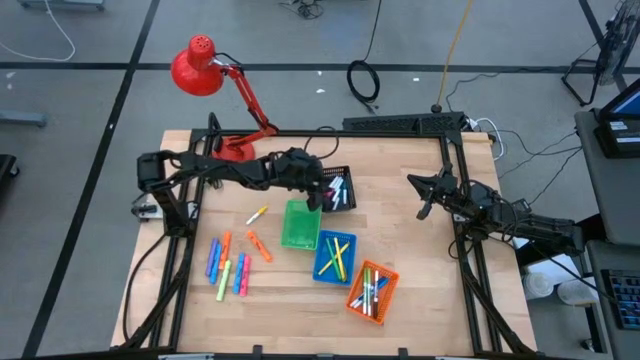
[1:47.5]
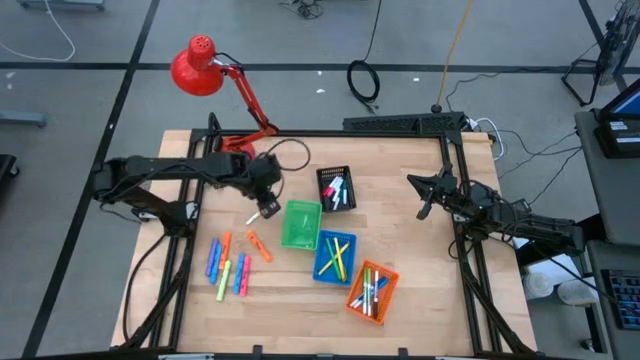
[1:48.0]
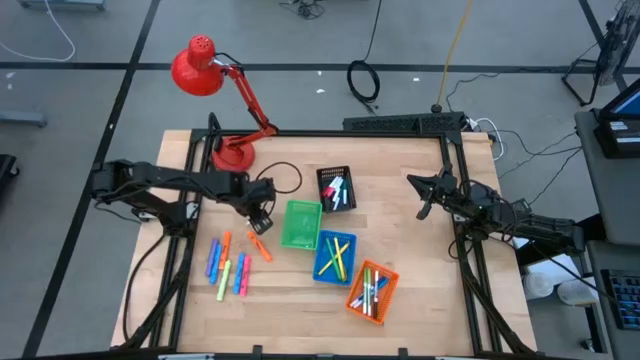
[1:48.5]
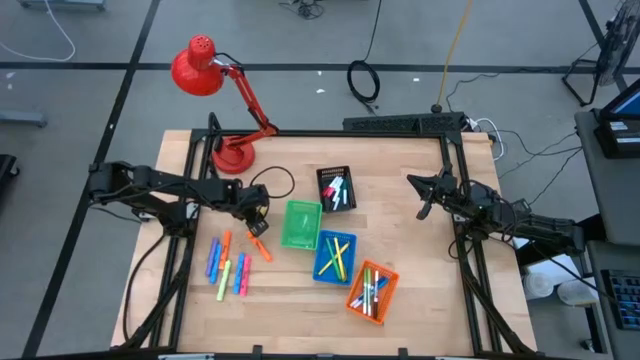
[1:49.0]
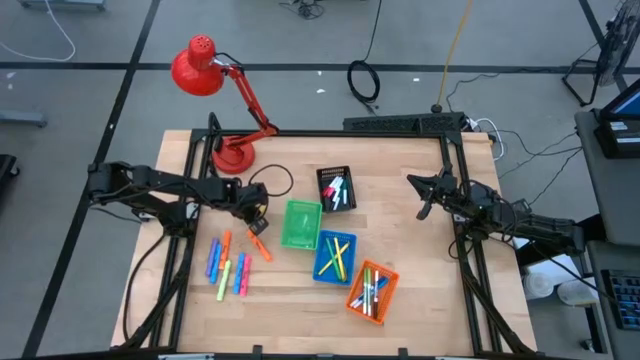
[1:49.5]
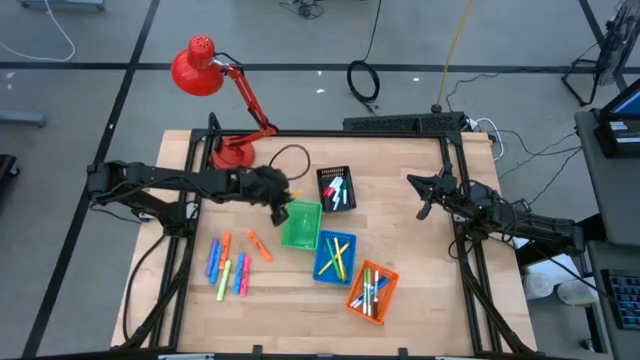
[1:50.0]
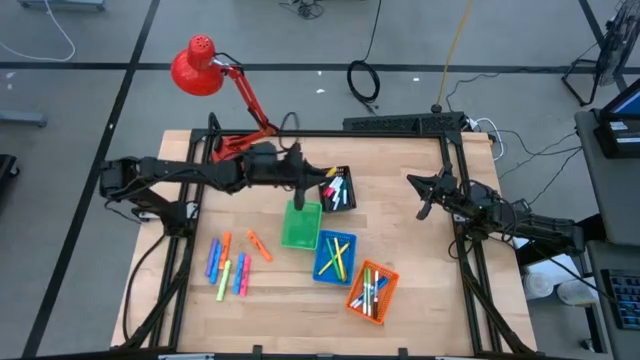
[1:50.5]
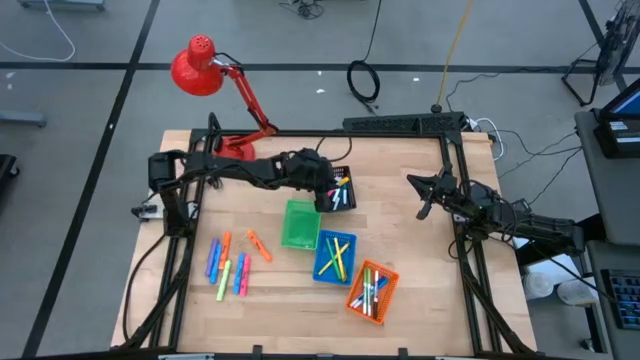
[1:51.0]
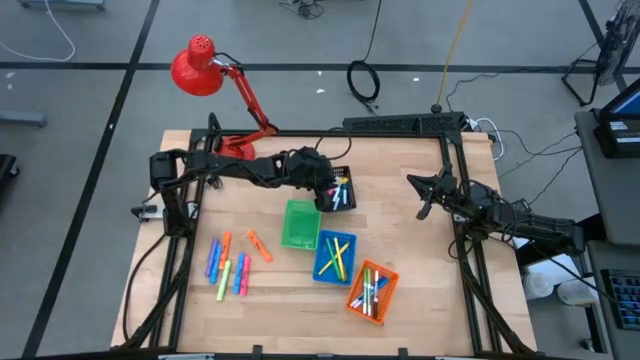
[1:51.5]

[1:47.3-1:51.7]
Task: Pick & Place Markers
Put the yellow and white highlighter pen into the black basket

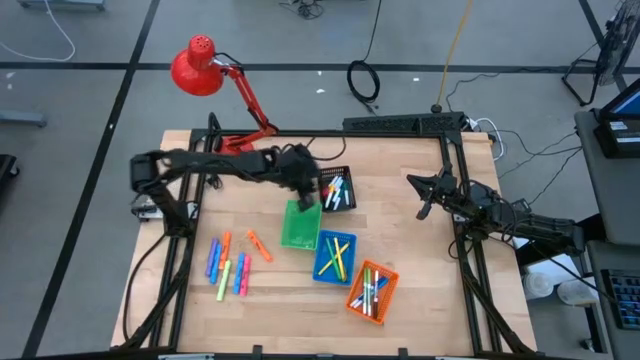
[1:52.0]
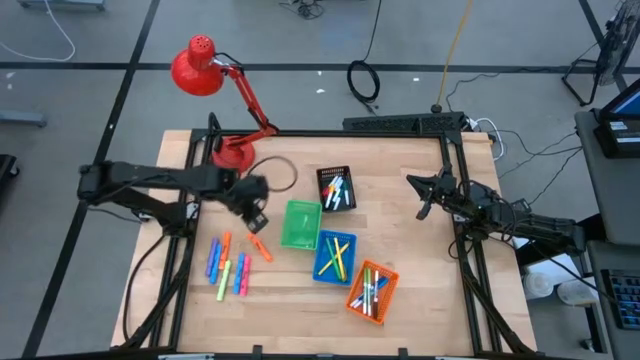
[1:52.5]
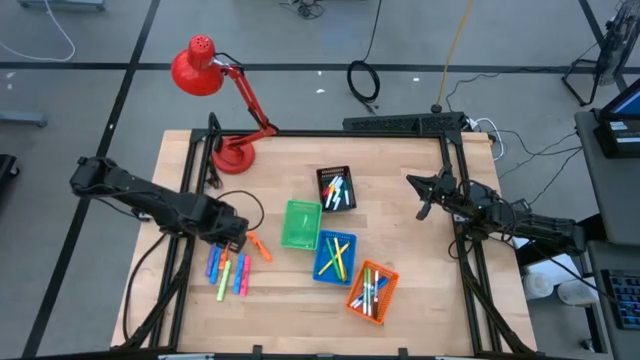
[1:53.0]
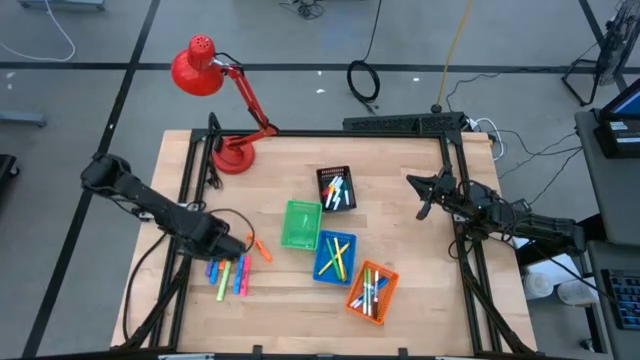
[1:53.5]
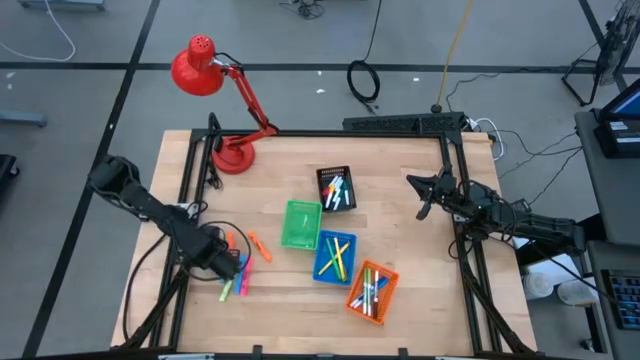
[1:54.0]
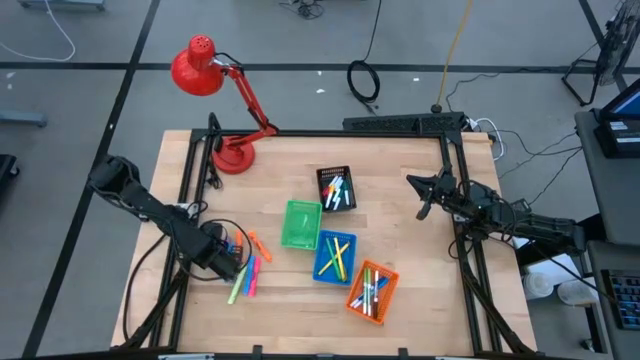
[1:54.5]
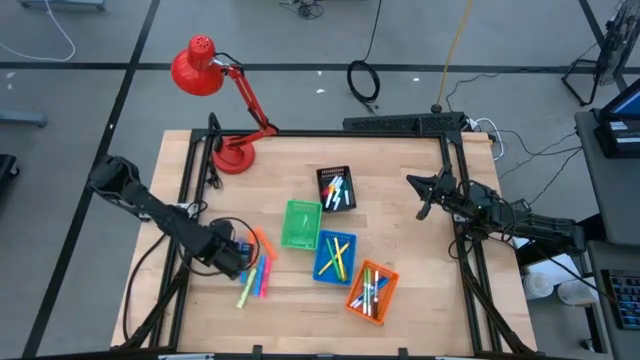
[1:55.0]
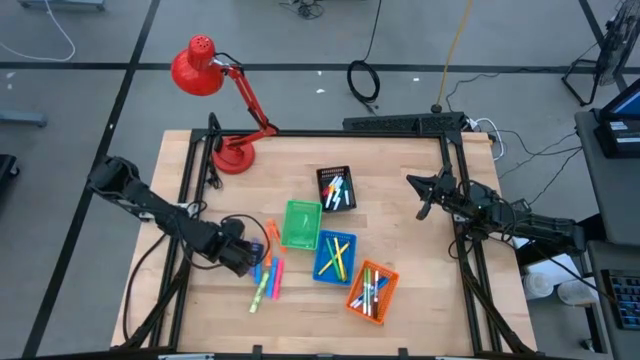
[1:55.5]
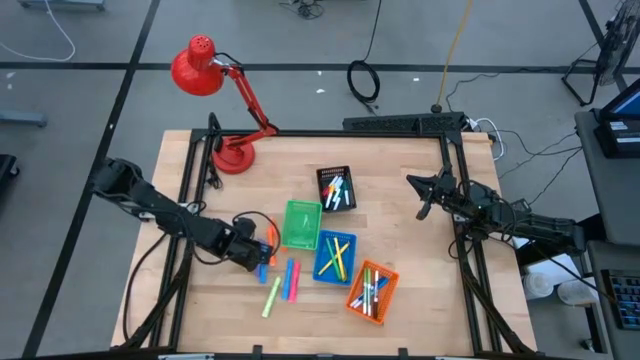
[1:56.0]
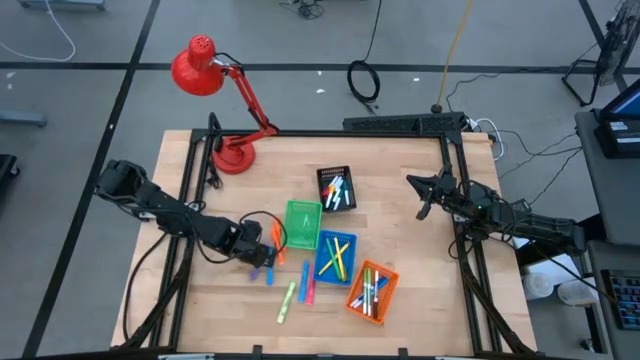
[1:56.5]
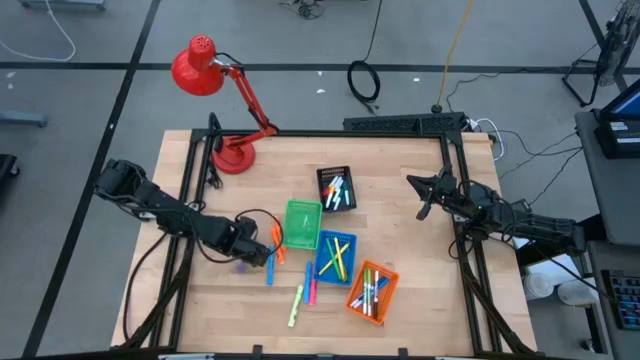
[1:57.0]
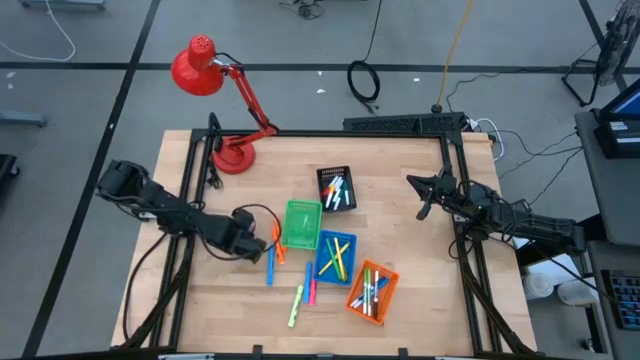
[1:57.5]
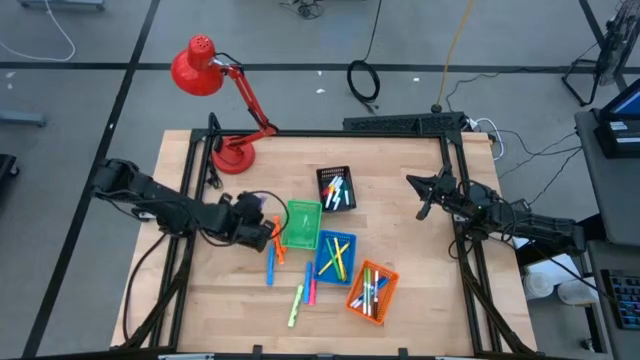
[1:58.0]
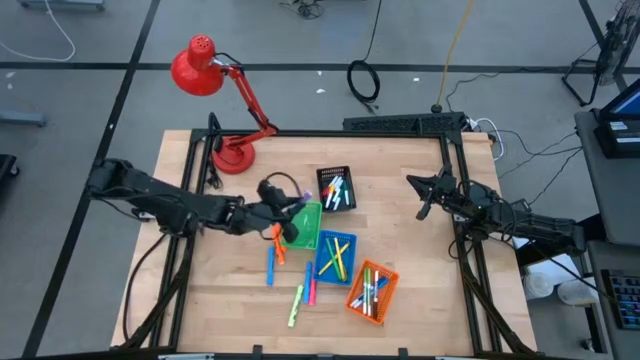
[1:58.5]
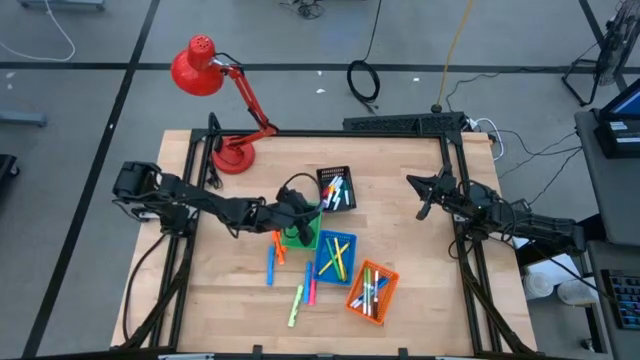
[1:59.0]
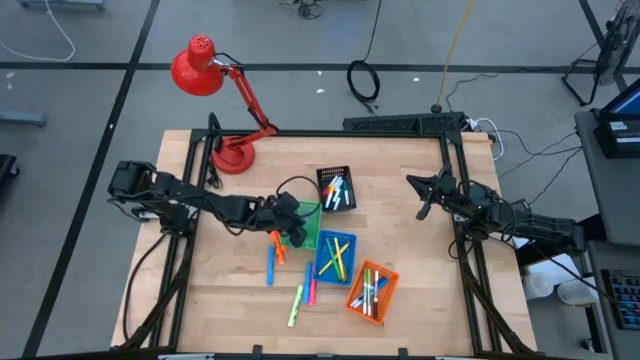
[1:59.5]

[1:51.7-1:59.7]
Put the purple highlighter into the green basket

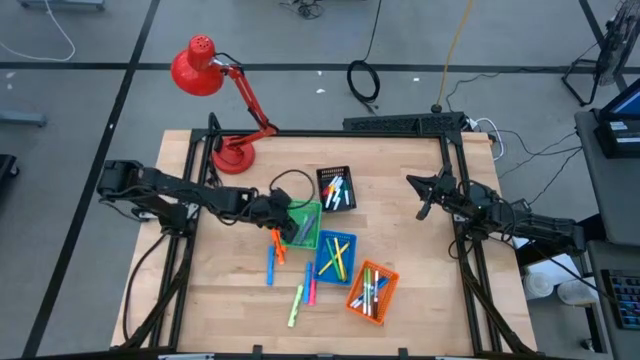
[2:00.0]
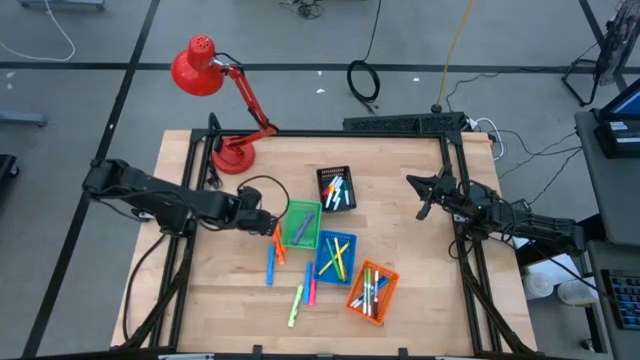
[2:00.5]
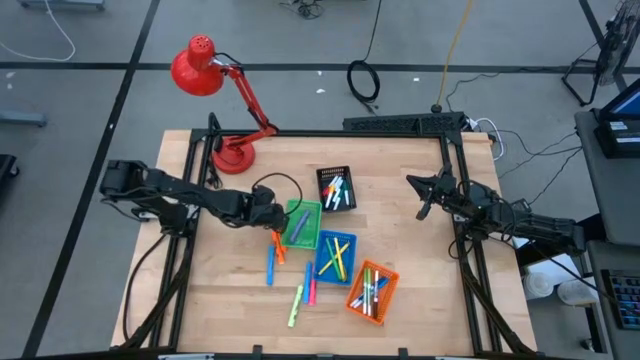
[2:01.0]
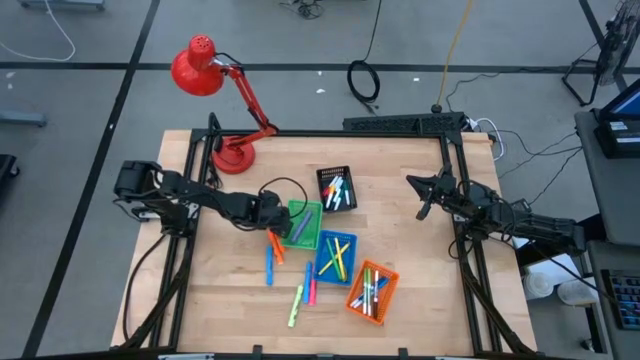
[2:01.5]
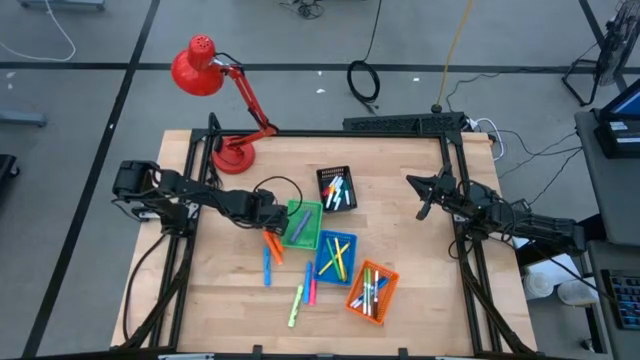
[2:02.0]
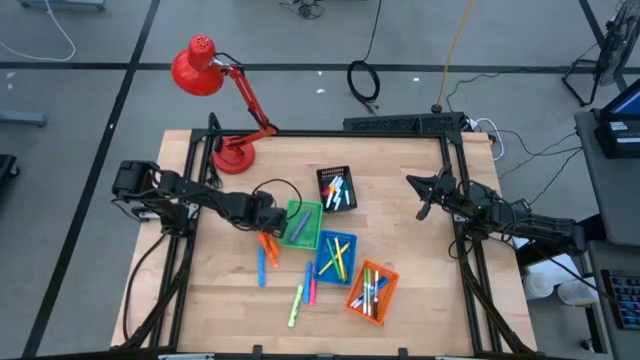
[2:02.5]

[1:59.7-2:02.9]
Put the right orange highlighter into the green basket

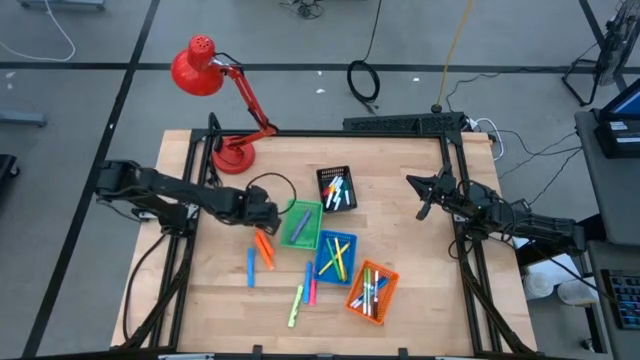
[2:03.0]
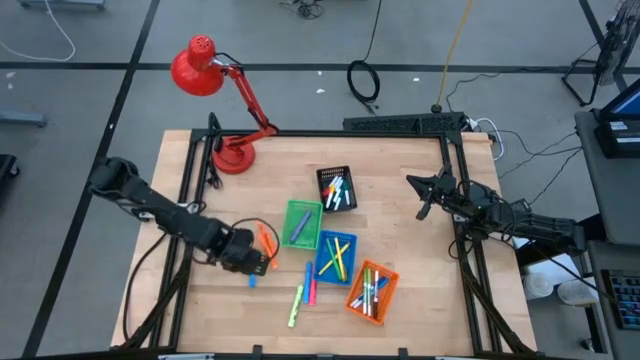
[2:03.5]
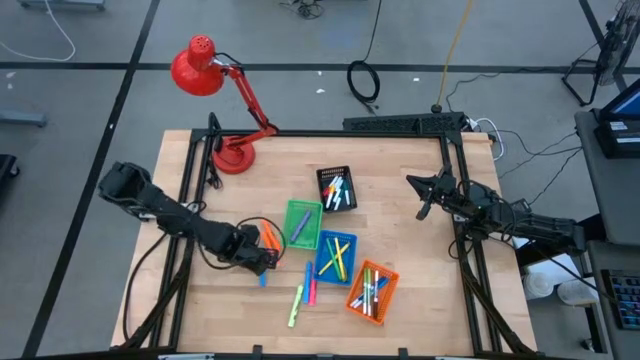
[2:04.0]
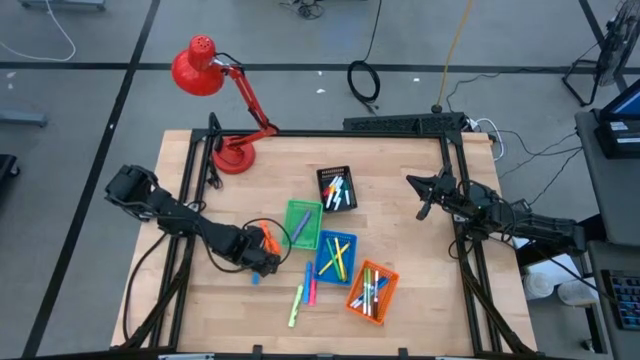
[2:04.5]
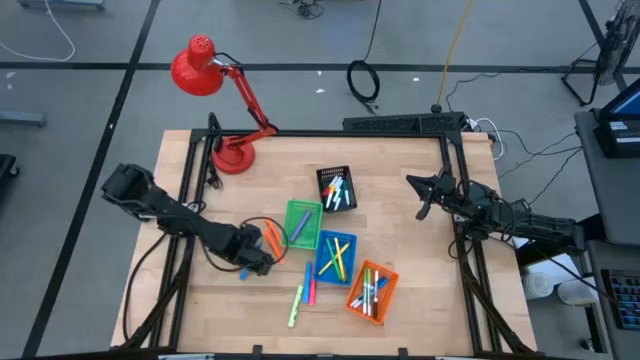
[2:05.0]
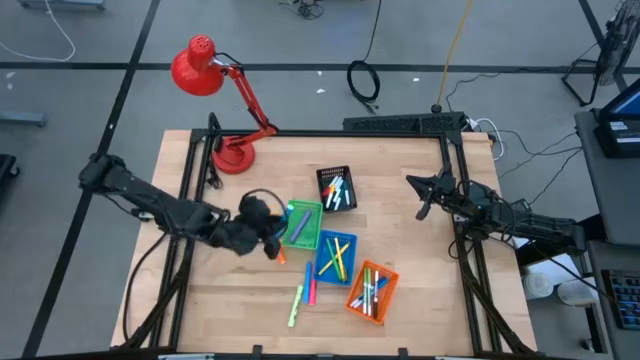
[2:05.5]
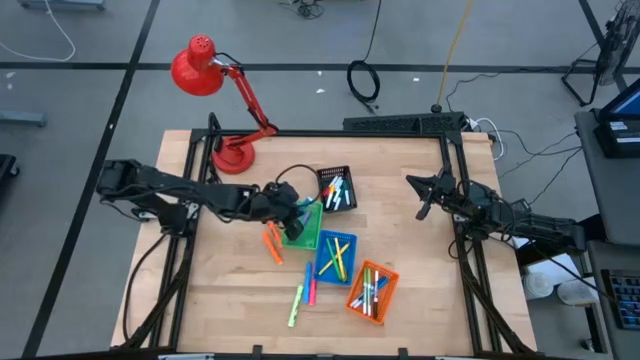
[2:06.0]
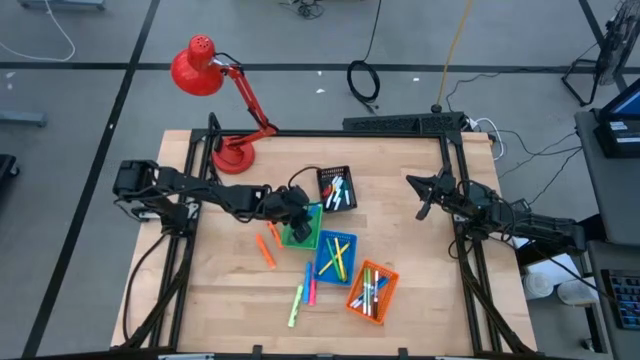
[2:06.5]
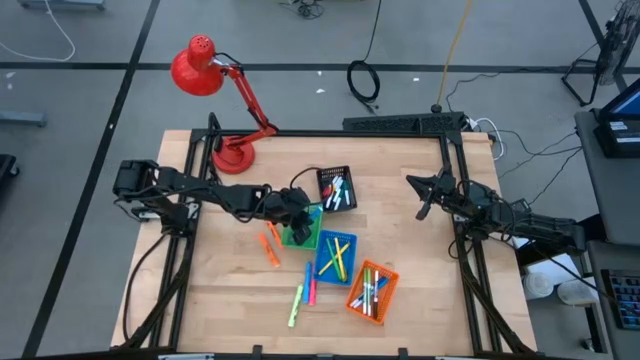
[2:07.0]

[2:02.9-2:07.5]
Put the left blue highlighter into the green basket
